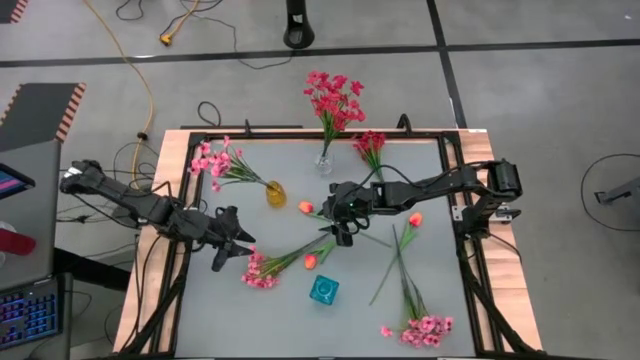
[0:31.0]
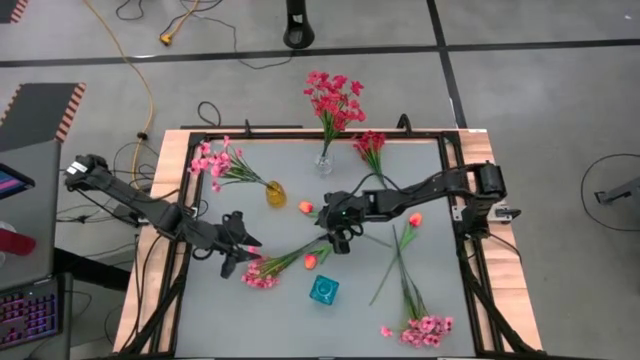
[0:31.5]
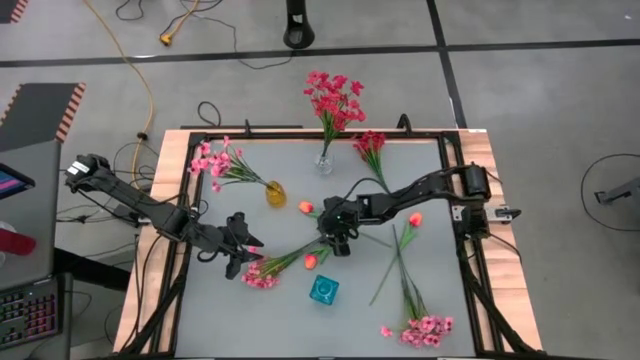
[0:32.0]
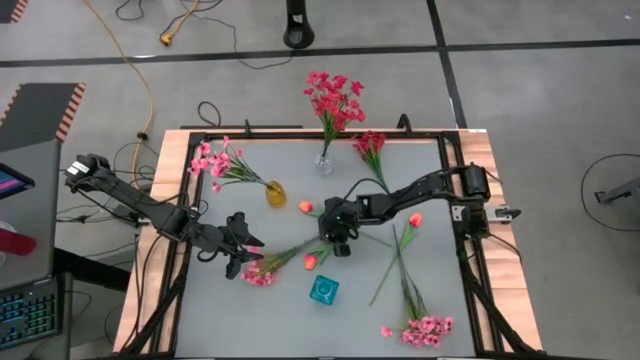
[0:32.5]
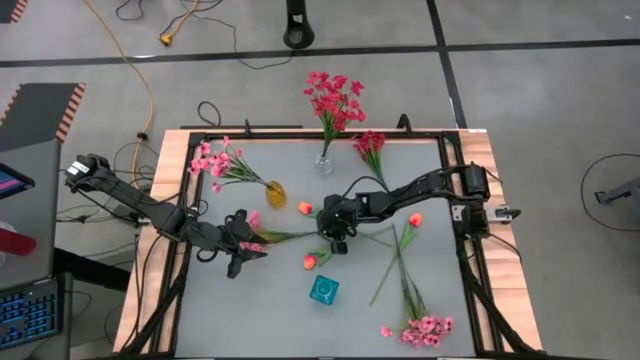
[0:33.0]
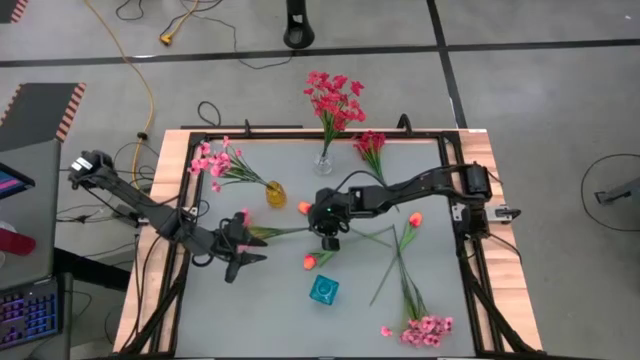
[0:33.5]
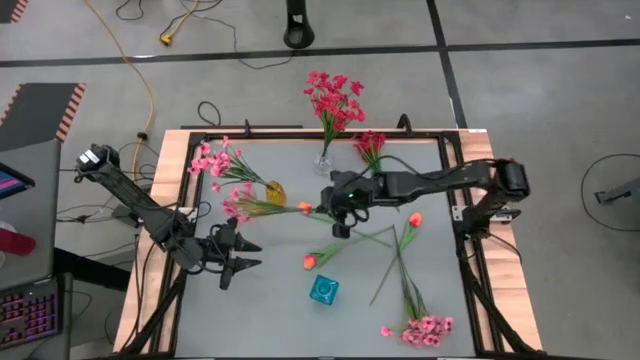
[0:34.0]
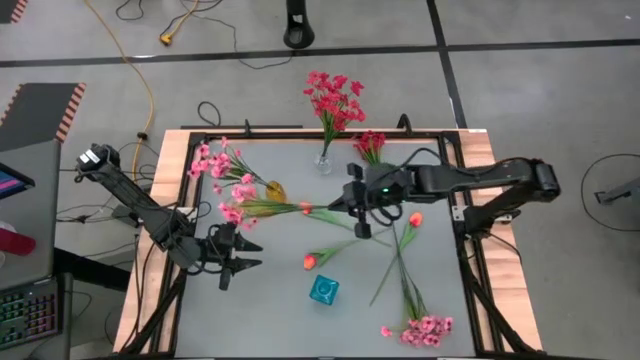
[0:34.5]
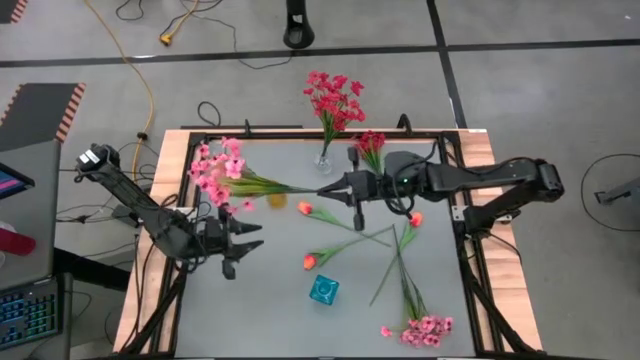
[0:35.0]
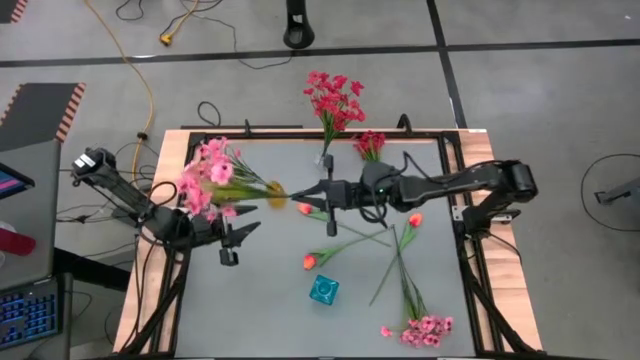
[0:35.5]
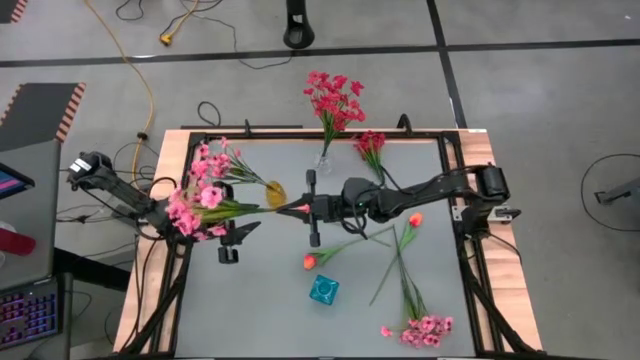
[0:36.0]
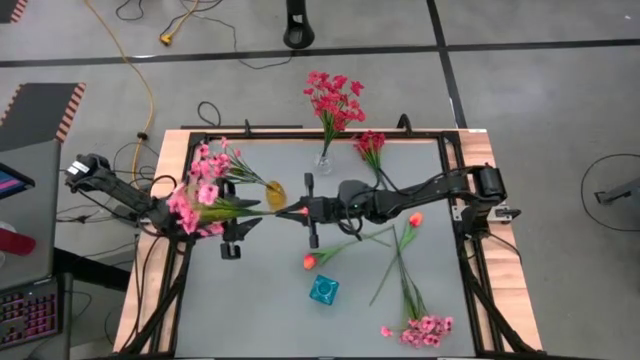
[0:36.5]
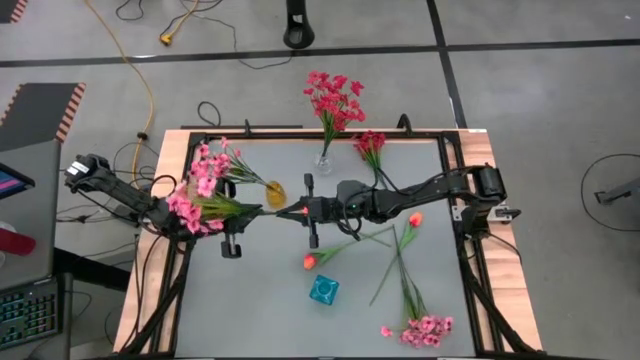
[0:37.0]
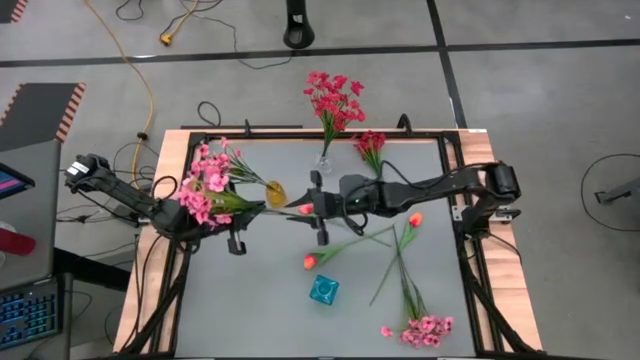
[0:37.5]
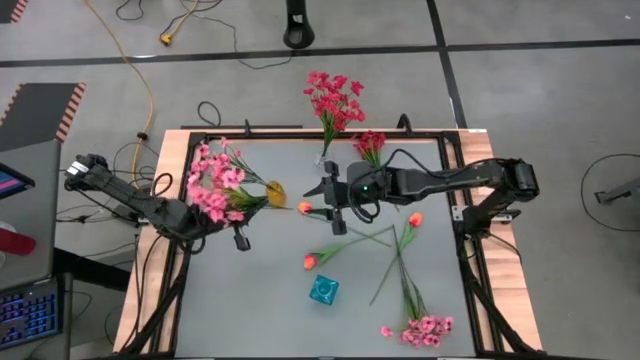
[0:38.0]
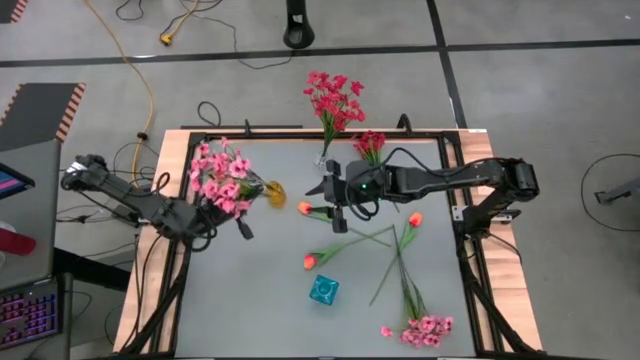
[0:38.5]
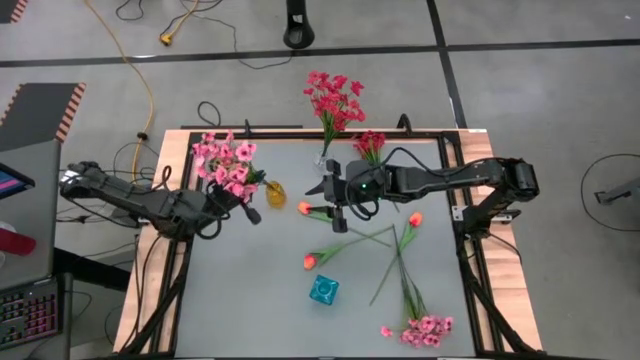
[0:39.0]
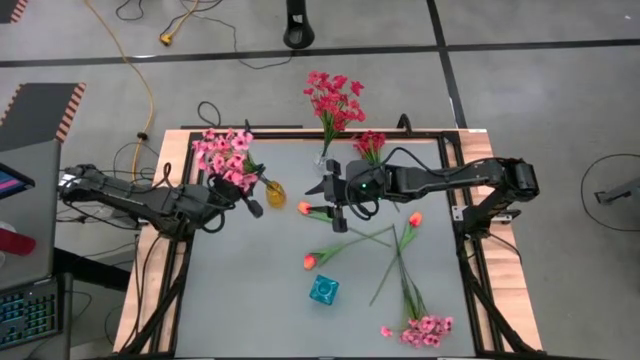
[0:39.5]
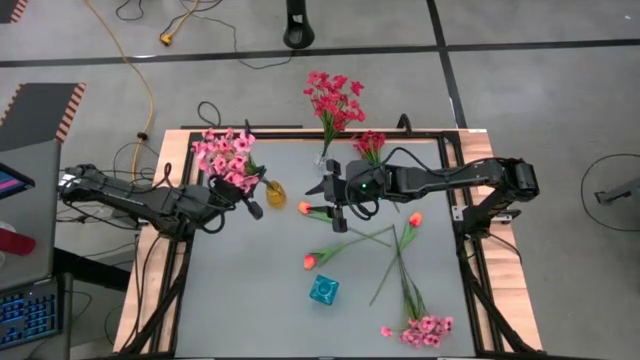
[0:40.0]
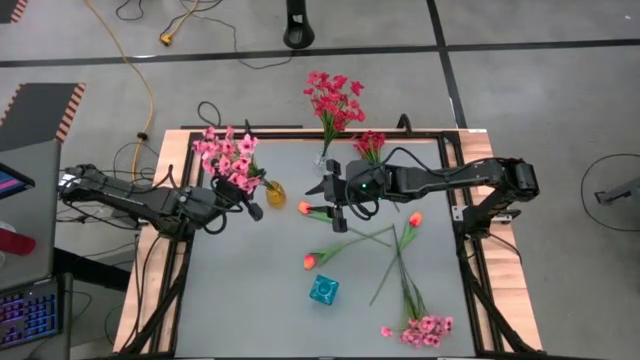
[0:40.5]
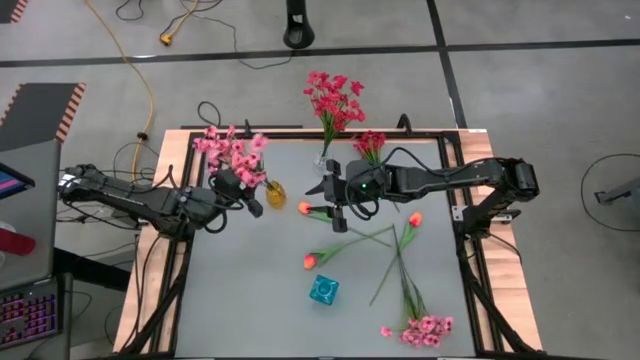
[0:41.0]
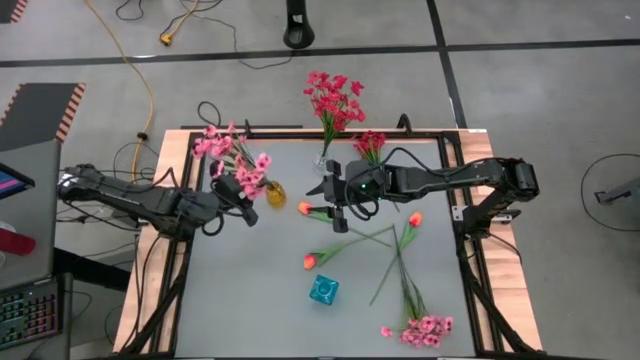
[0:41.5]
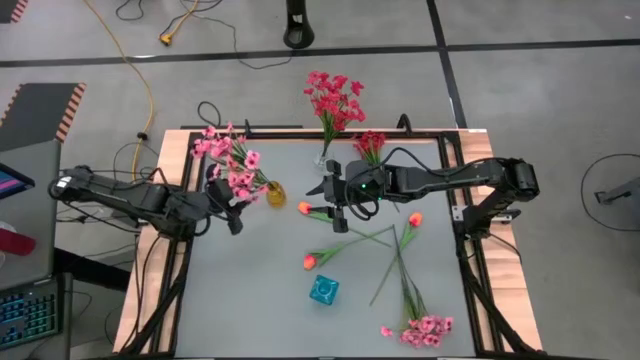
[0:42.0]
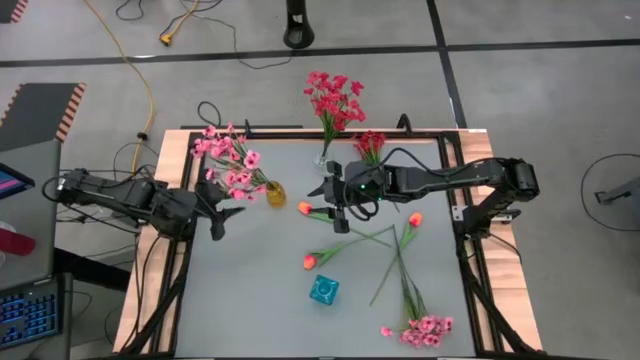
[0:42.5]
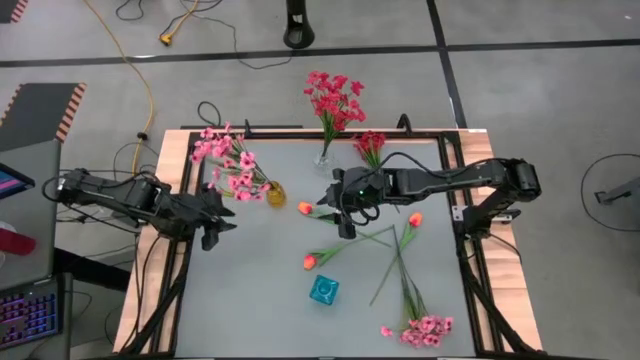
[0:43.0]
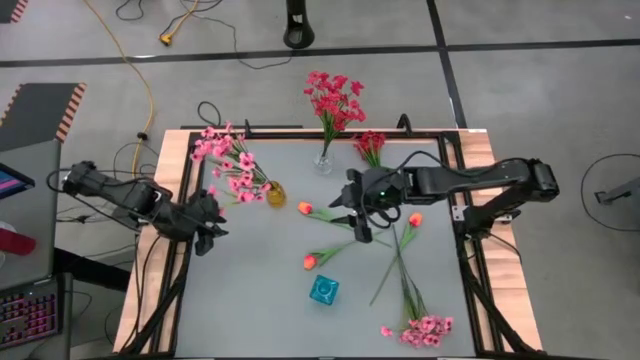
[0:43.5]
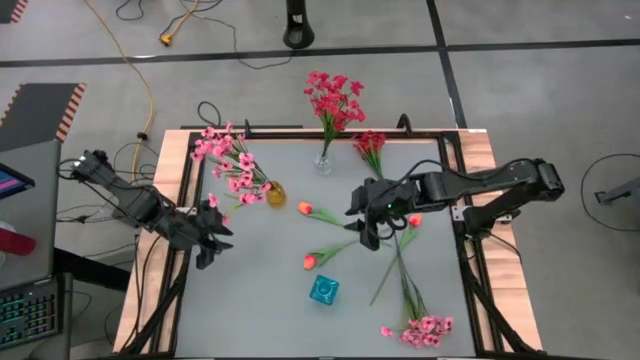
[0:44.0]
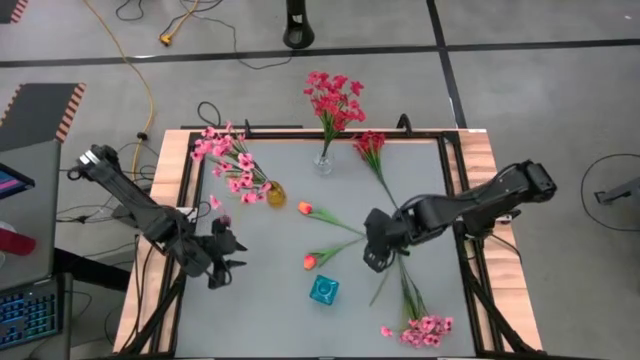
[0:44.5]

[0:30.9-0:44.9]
Task: Sort flowers into vase by color
Put the left pink flowers into the yellow vase

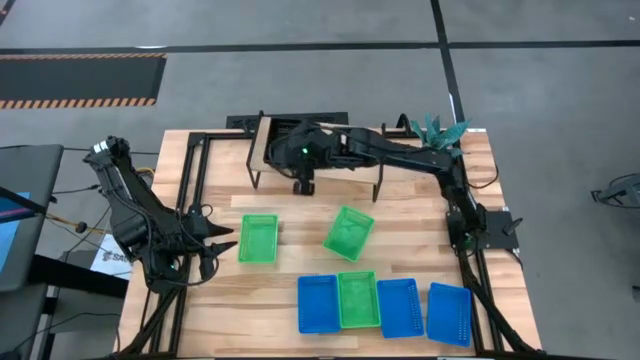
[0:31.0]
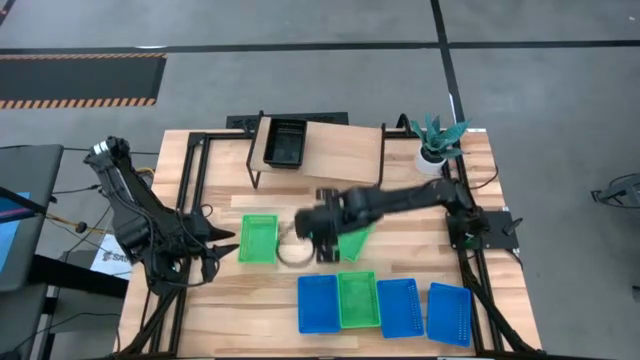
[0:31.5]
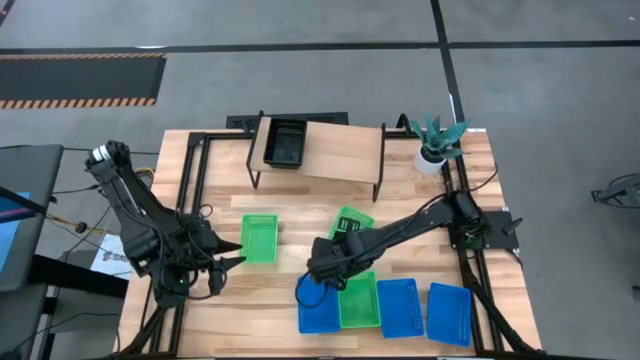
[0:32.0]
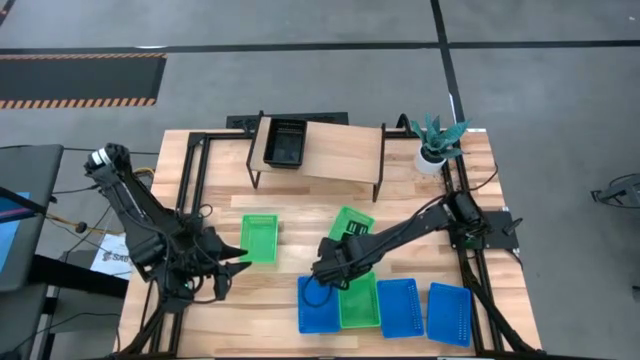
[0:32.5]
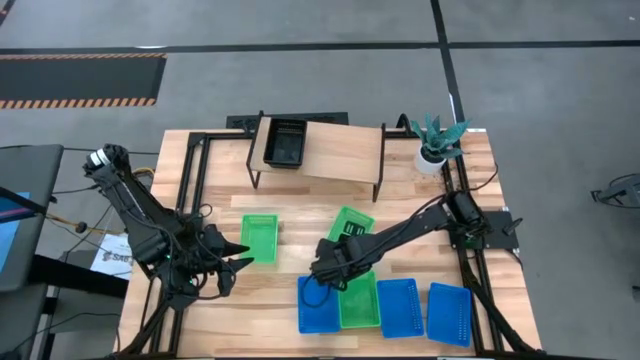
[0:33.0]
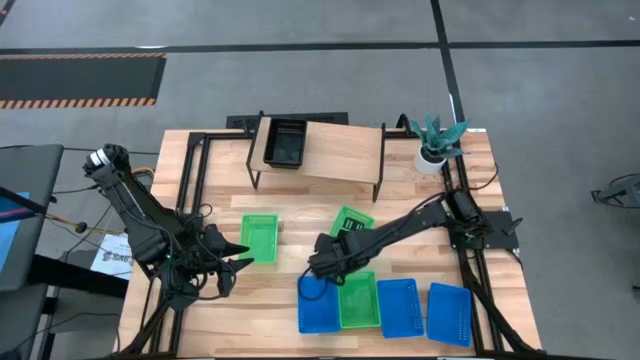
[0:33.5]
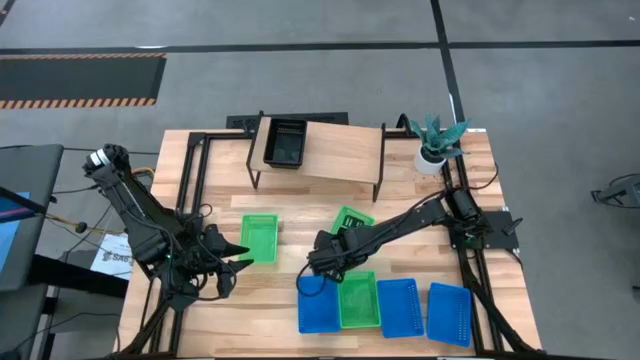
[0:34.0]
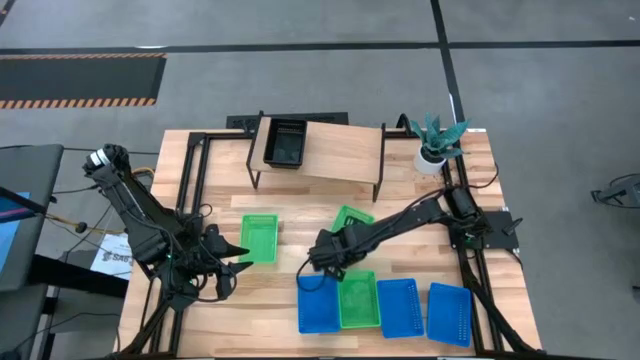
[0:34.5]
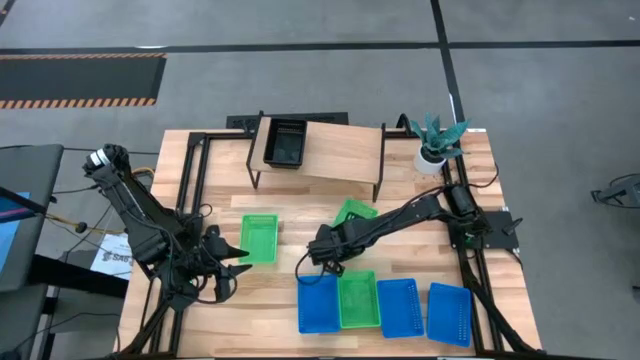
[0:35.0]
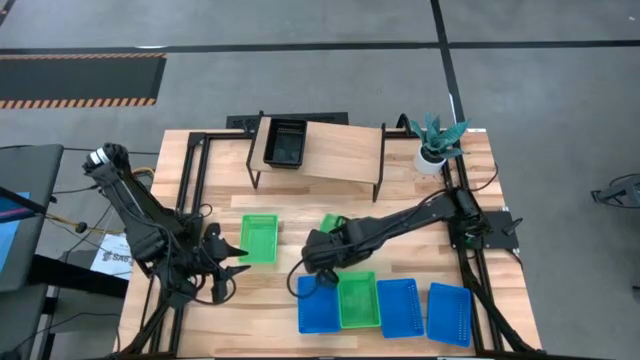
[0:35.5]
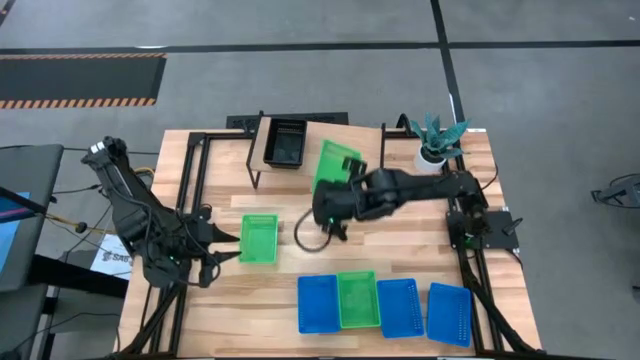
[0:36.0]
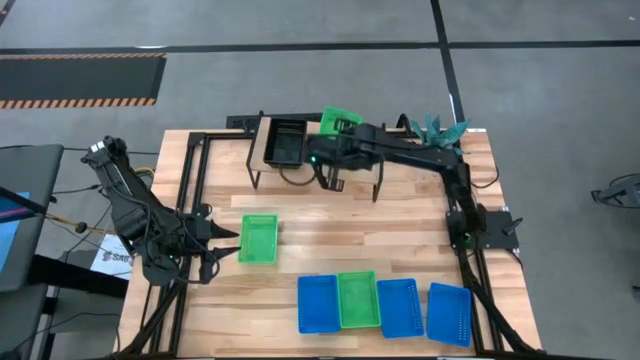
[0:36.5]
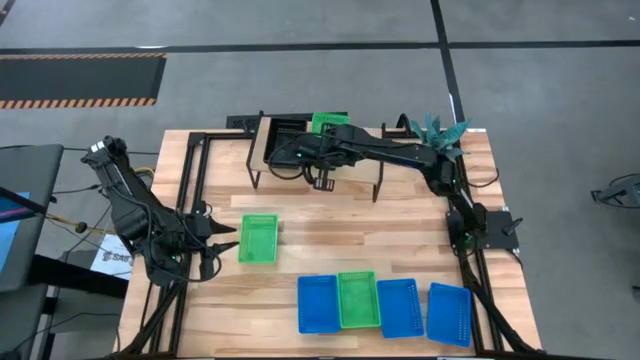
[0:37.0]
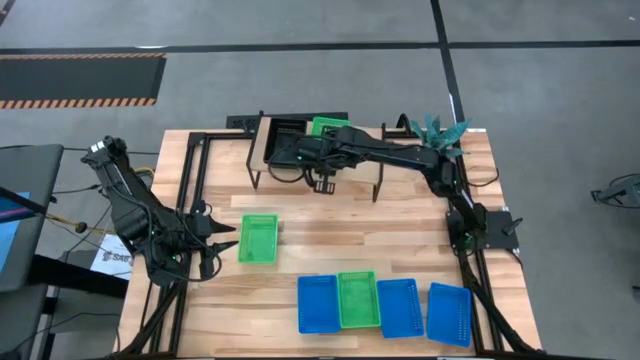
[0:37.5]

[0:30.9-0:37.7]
Task: Stack baskets on shelf by color
Put the top right green bin on the shelf
